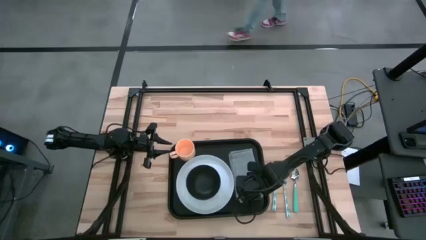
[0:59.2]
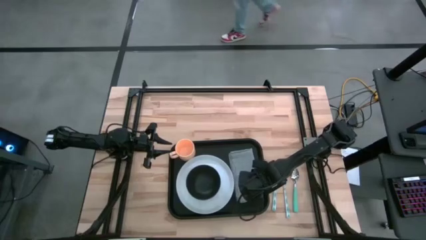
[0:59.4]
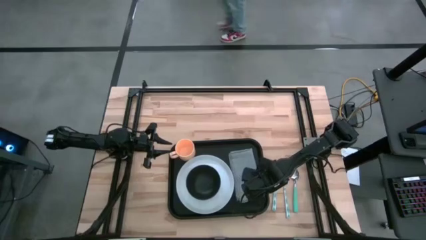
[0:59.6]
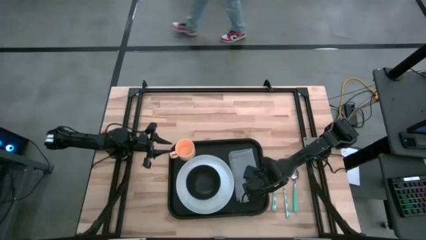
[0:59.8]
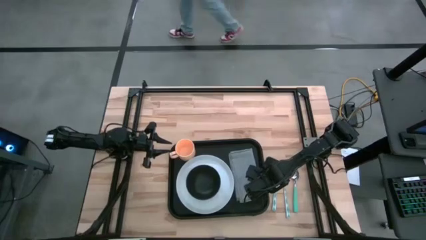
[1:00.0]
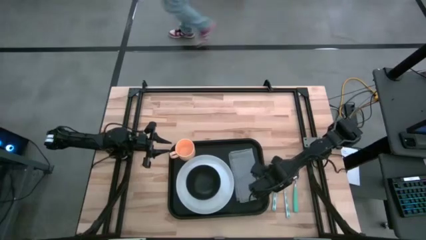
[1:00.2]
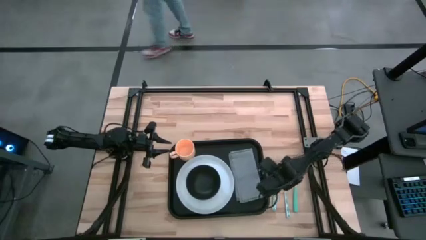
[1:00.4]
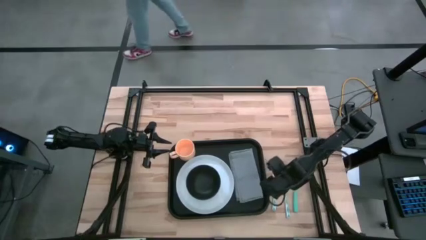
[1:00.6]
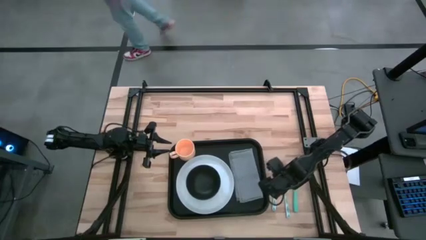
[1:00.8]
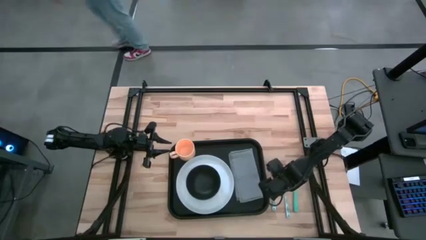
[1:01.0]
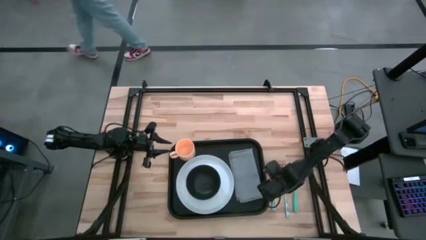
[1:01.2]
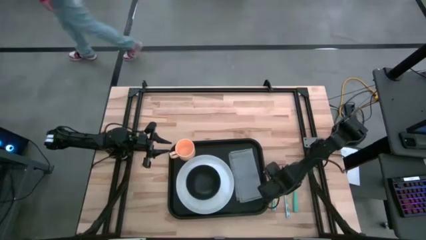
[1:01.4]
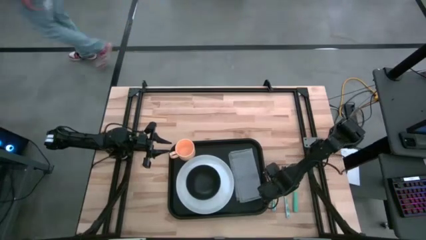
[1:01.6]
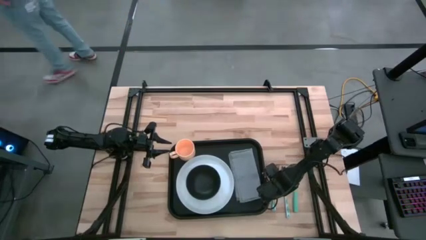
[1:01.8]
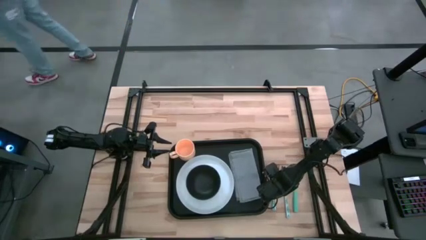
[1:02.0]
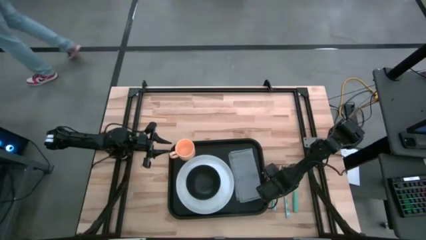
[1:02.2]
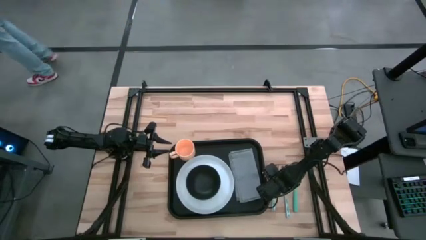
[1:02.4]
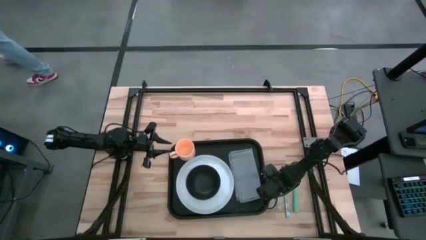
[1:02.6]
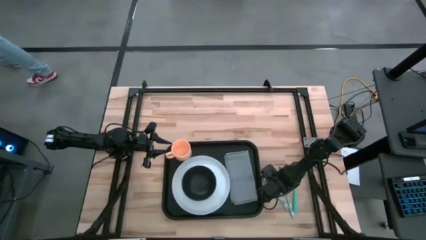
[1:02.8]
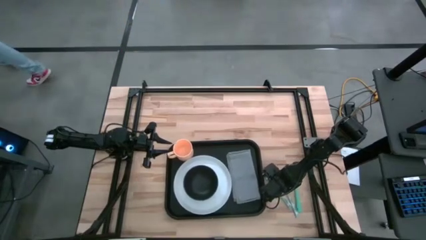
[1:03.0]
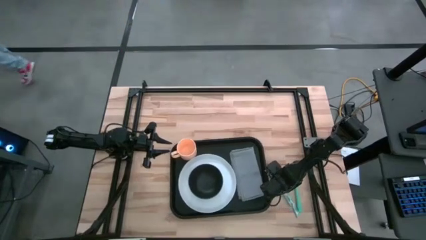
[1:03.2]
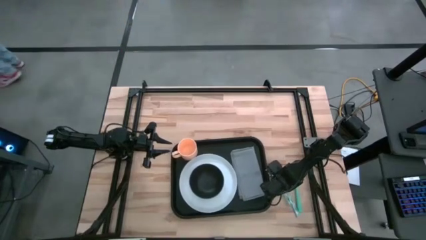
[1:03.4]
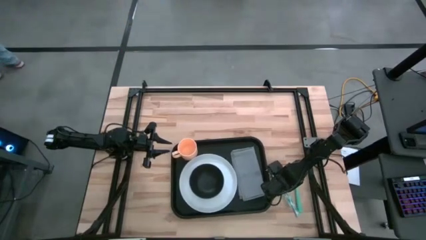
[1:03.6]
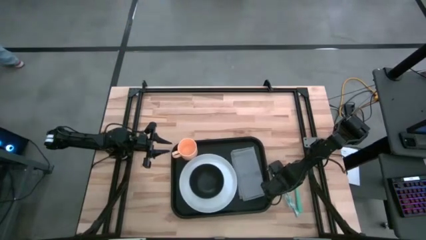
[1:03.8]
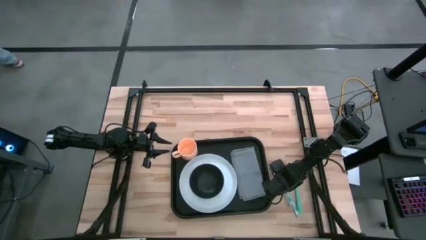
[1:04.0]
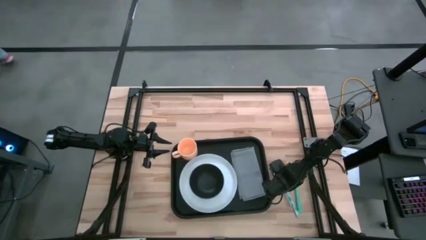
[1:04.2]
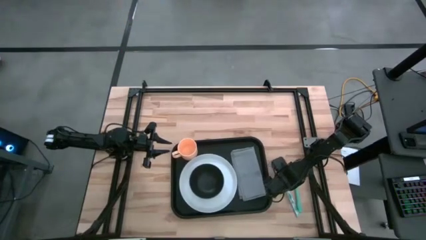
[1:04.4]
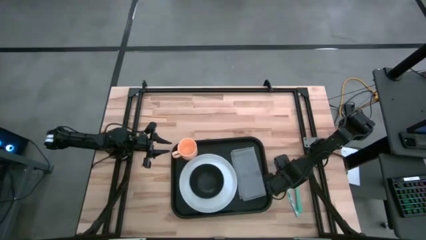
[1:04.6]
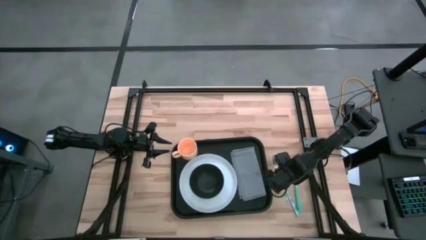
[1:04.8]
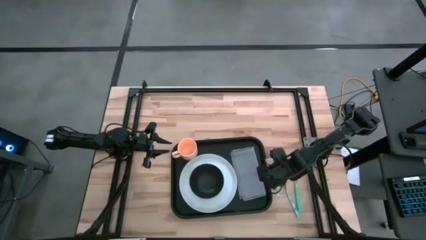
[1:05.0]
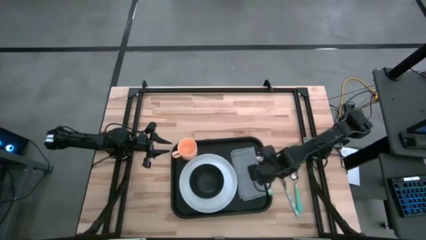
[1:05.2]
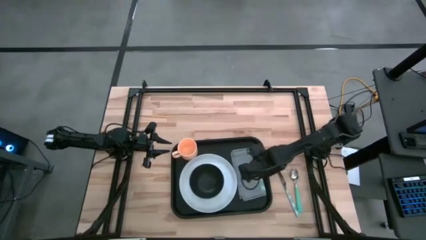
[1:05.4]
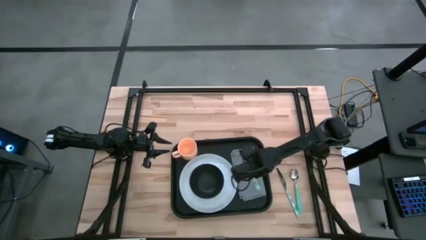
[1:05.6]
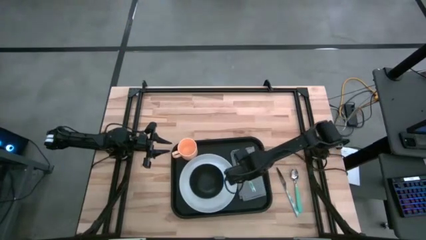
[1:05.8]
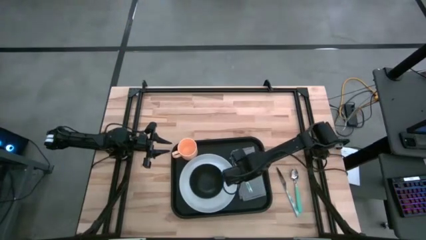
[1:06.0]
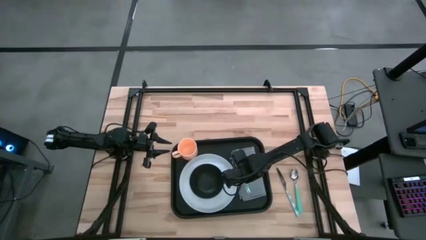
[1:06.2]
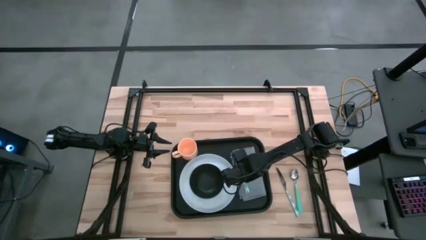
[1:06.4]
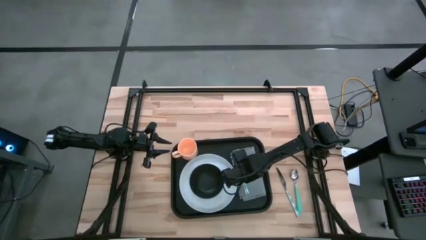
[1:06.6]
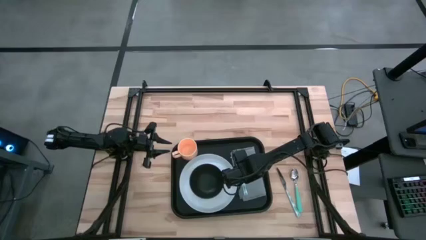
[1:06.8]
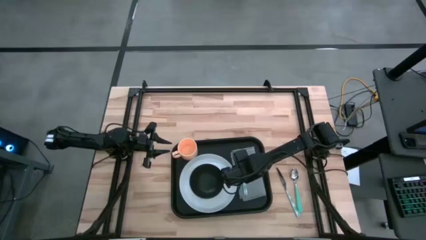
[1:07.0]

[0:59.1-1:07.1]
Task: Set up tray
Put the blue fork on top of the gray napkin

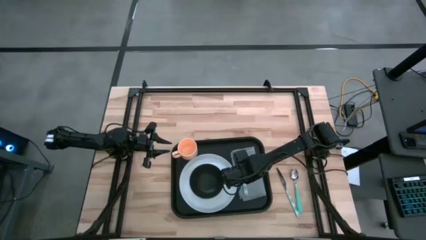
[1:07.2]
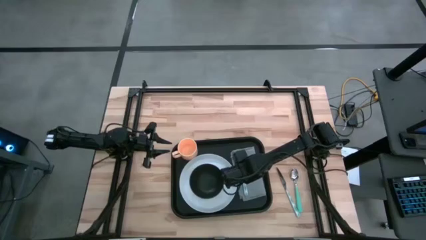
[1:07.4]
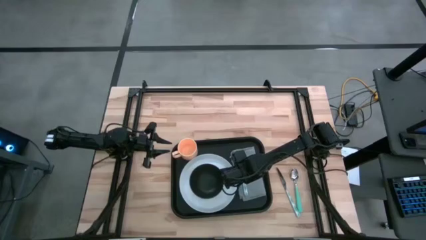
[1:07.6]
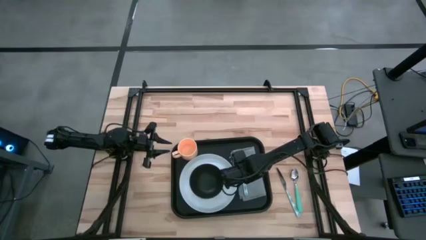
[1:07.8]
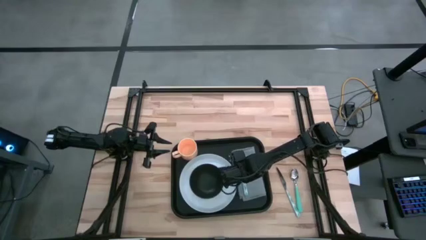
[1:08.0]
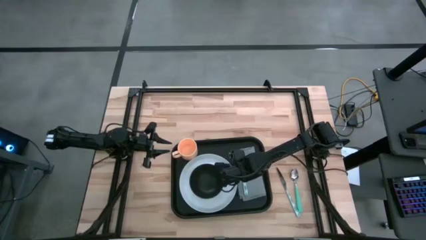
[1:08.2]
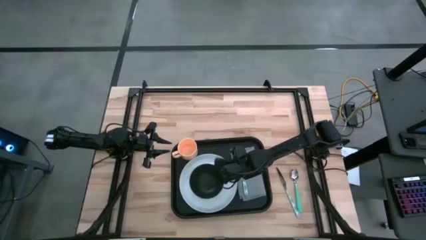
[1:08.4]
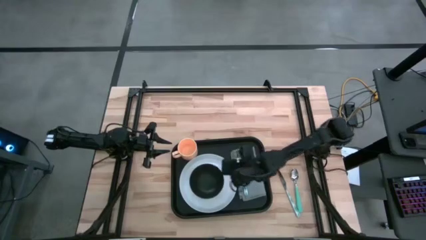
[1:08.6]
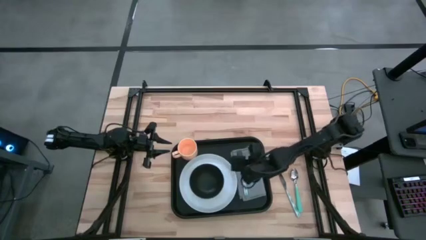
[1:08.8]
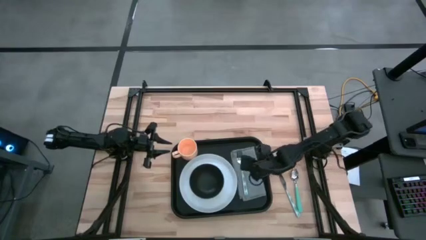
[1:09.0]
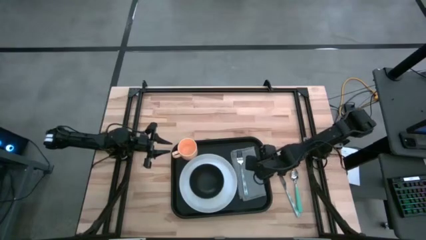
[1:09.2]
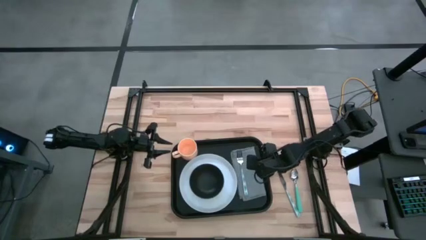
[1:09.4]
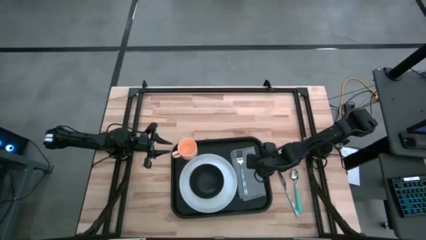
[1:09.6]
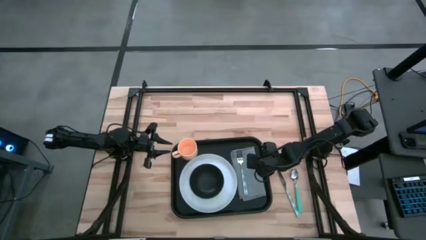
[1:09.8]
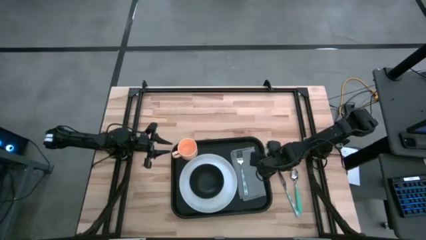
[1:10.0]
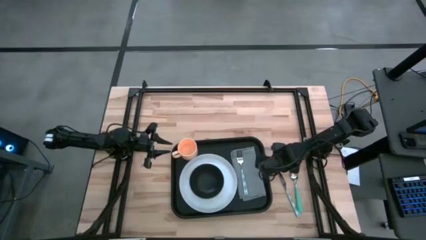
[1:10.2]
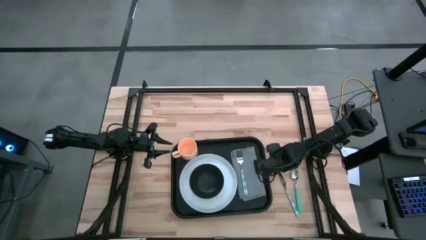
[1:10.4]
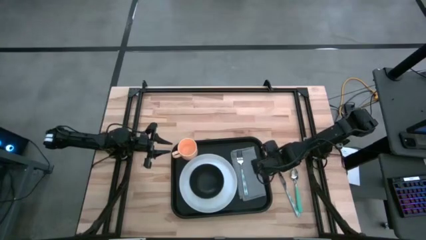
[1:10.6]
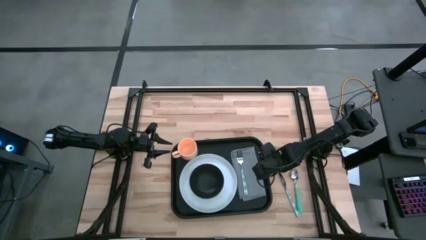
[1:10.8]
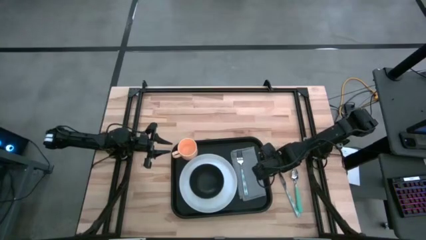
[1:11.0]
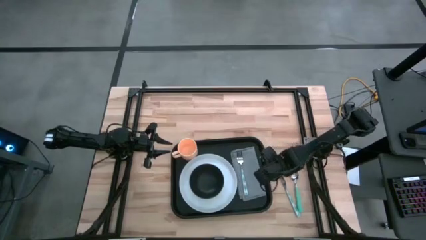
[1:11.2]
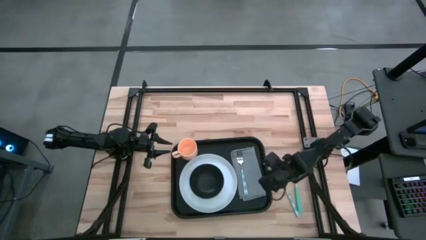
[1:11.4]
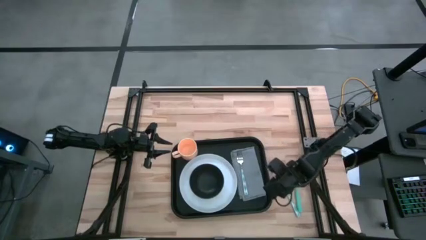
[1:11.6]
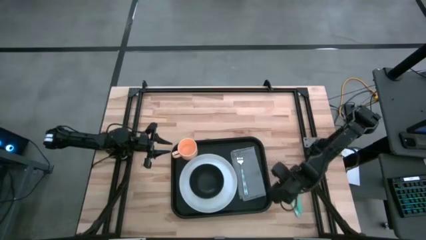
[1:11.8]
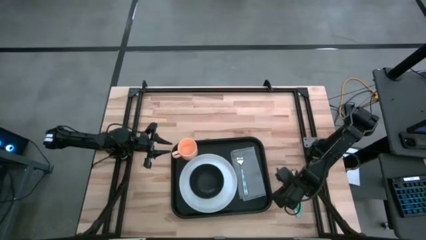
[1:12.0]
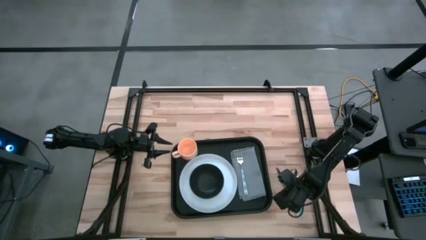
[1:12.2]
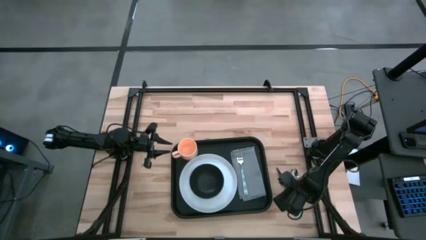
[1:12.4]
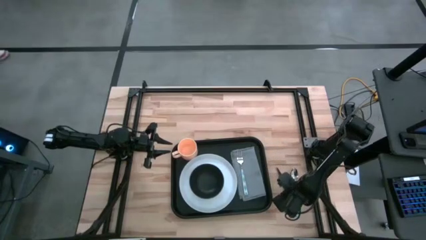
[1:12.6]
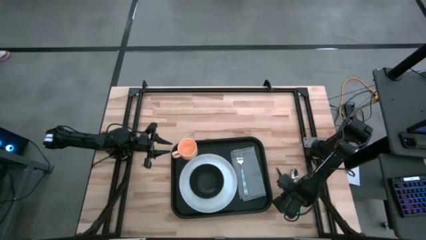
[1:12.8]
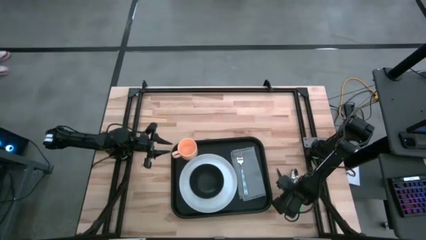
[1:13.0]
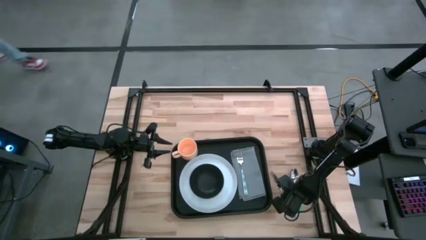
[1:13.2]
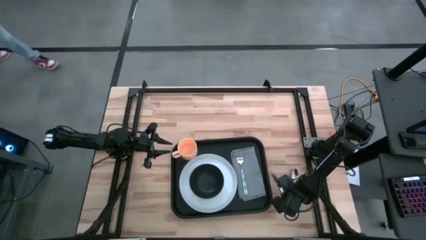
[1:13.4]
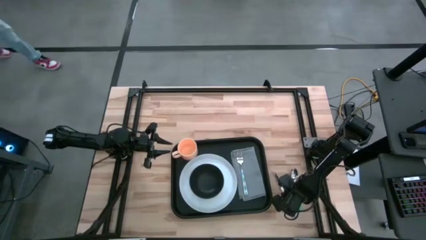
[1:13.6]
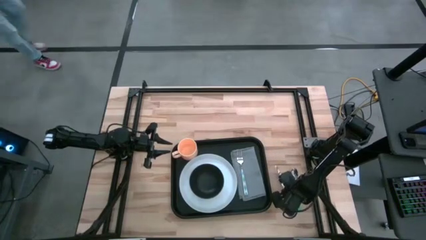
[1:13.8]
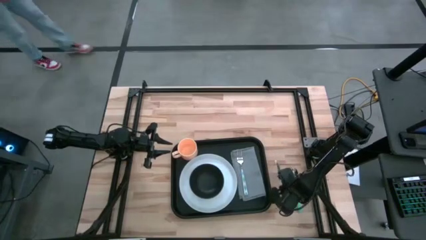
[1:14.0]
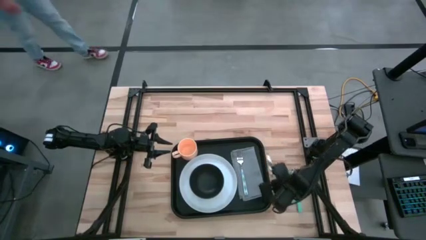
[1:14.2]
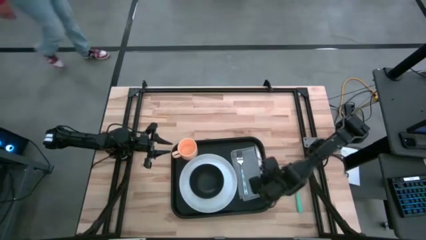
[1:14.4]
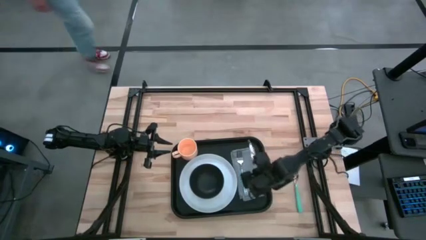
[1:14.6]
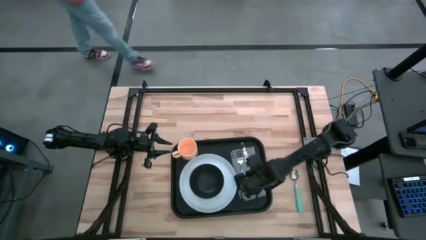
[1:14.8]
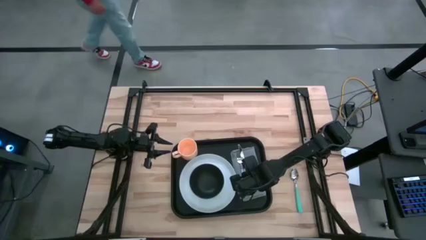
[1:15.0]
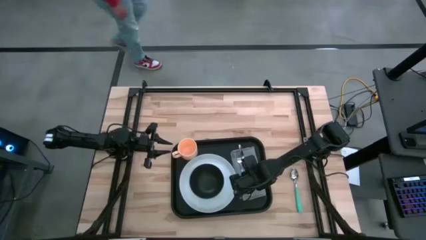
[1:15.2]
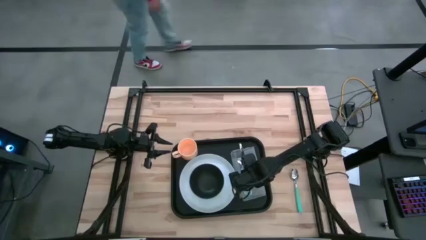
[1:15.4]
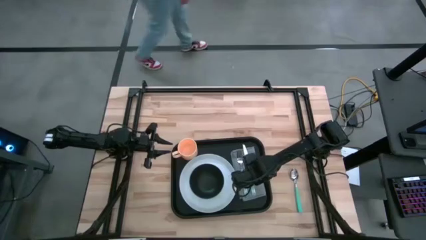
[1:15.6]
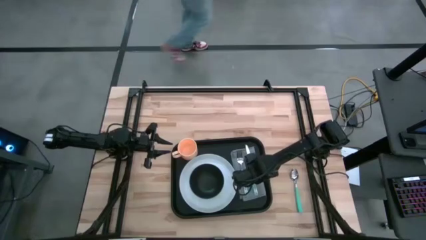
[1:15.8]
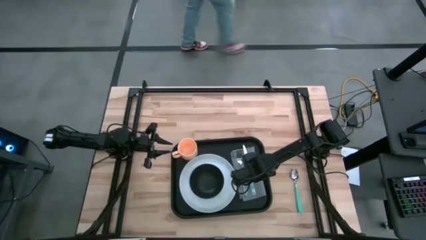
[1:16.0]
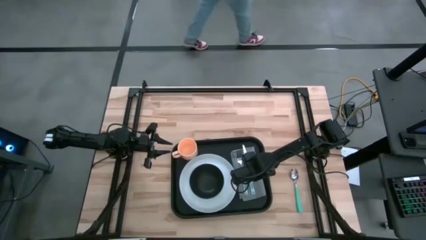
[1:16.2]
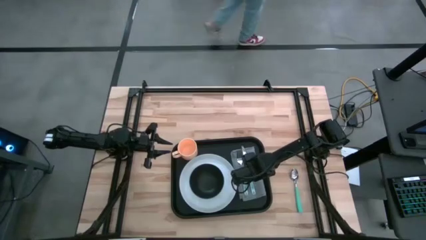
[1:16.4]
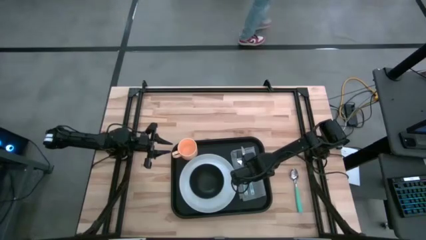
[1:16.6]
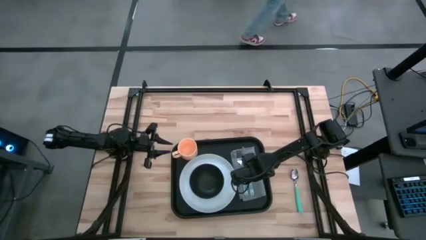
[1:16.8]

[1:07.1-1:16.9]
Put the blue knife on top of the gray napkin right of the blue fork
